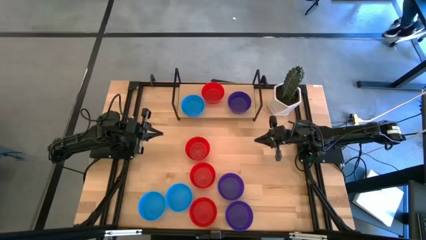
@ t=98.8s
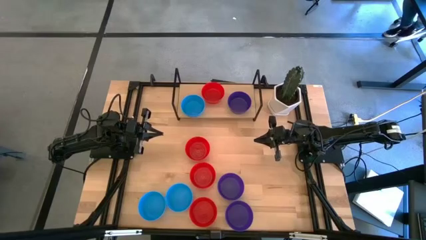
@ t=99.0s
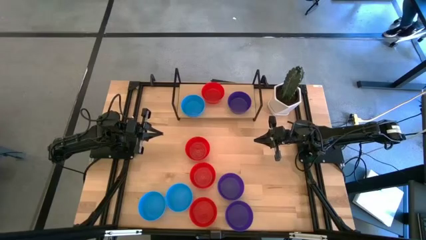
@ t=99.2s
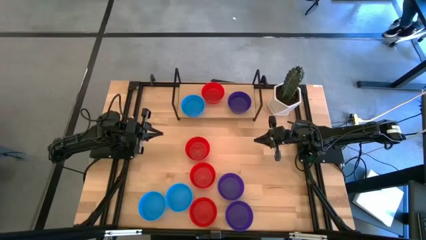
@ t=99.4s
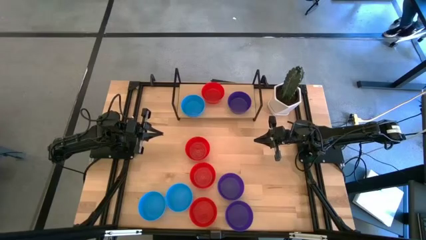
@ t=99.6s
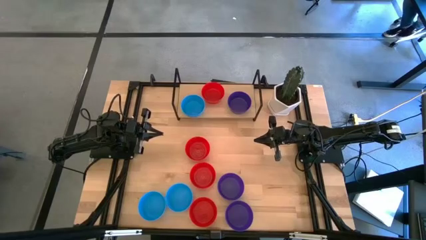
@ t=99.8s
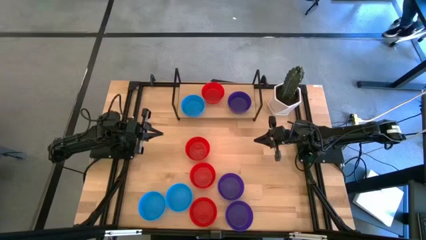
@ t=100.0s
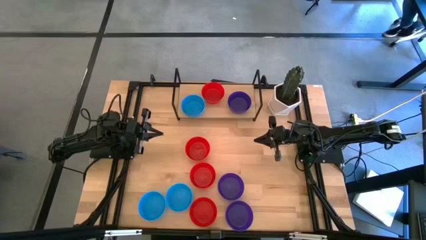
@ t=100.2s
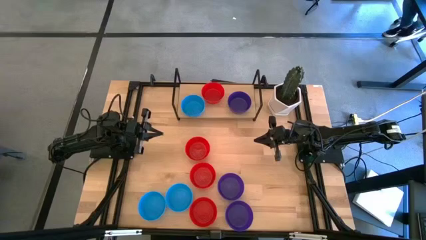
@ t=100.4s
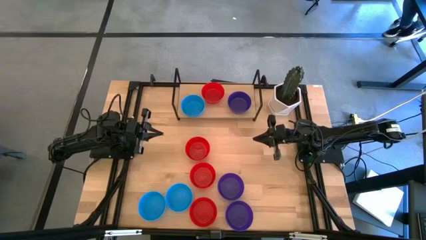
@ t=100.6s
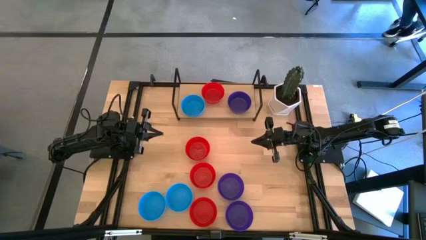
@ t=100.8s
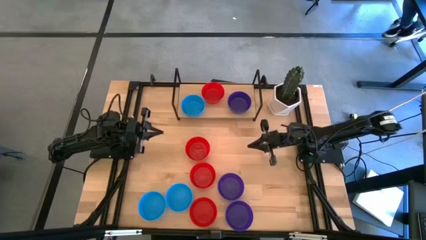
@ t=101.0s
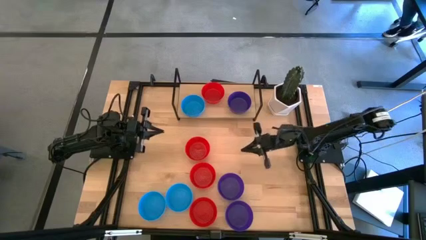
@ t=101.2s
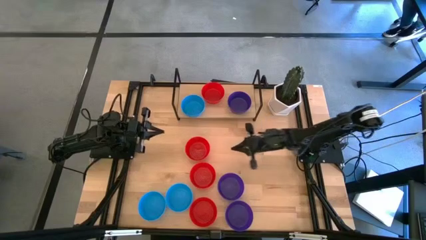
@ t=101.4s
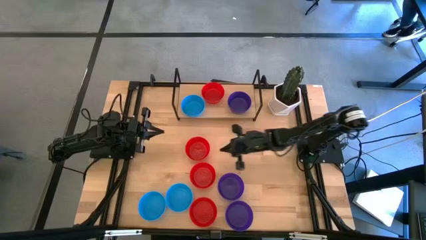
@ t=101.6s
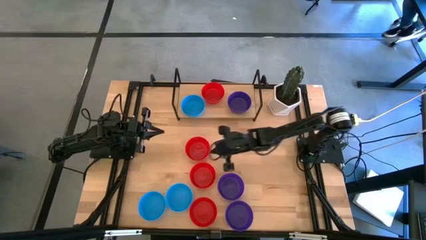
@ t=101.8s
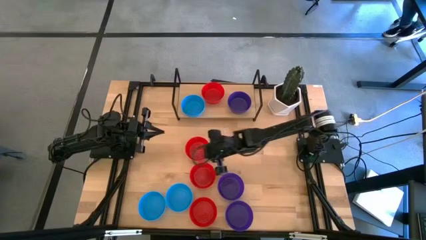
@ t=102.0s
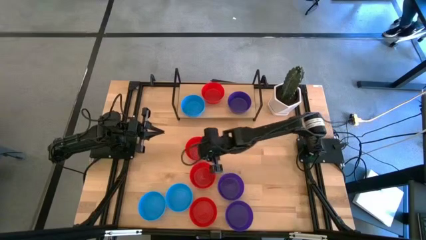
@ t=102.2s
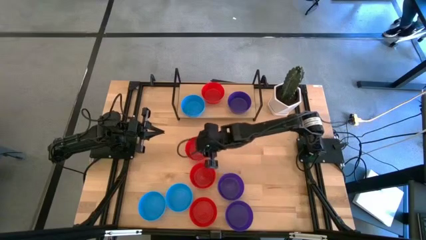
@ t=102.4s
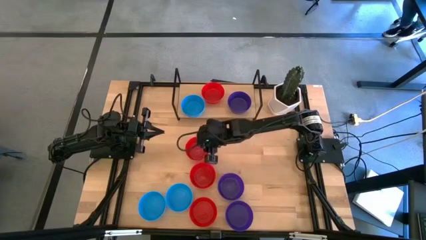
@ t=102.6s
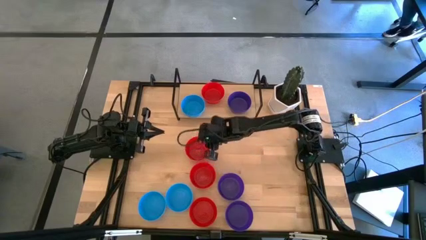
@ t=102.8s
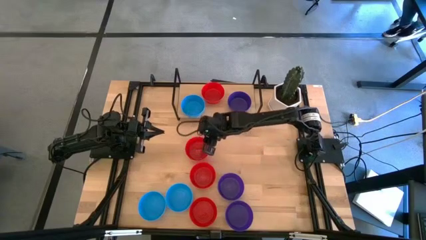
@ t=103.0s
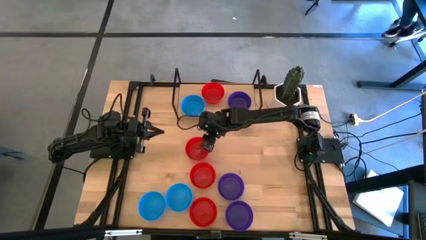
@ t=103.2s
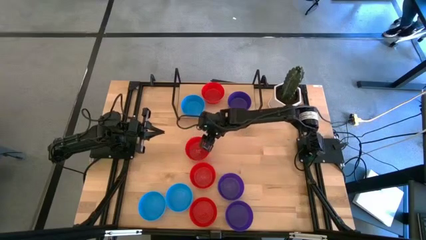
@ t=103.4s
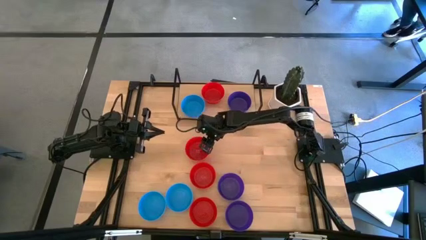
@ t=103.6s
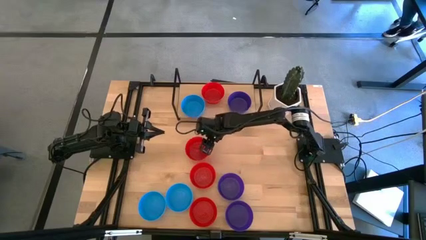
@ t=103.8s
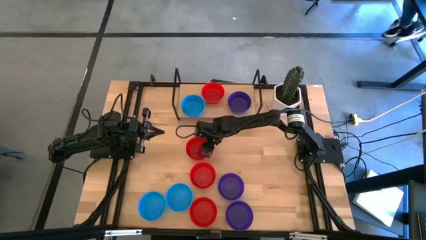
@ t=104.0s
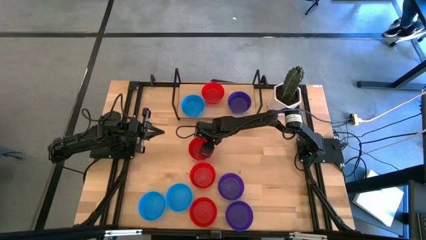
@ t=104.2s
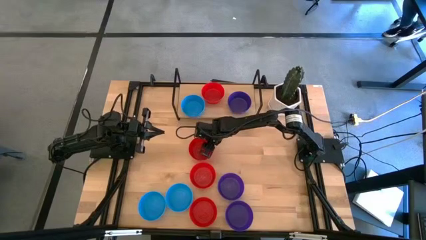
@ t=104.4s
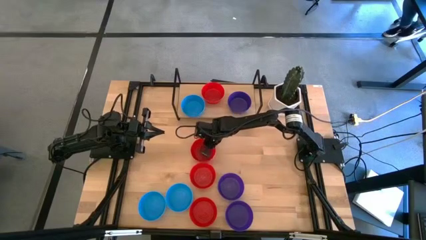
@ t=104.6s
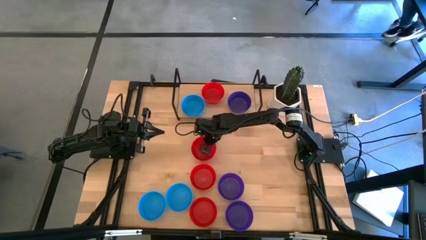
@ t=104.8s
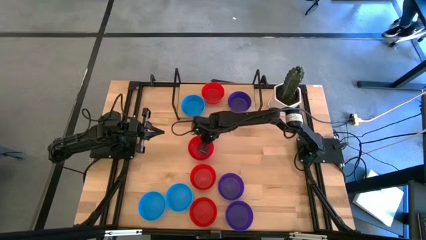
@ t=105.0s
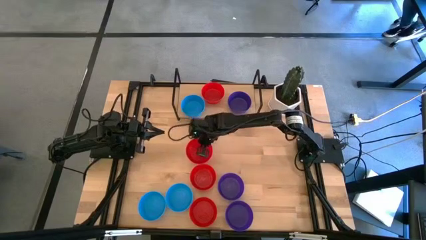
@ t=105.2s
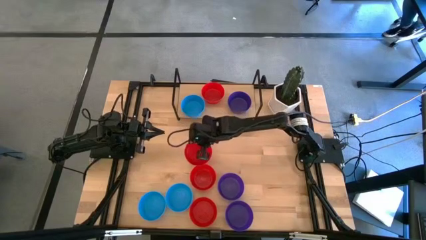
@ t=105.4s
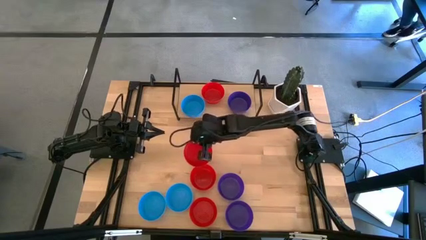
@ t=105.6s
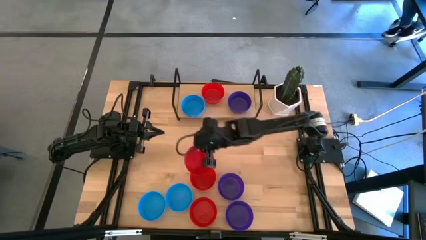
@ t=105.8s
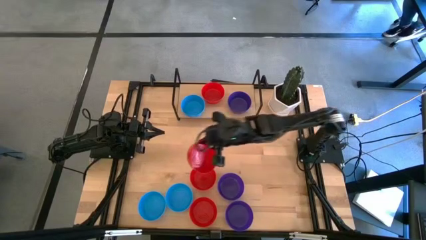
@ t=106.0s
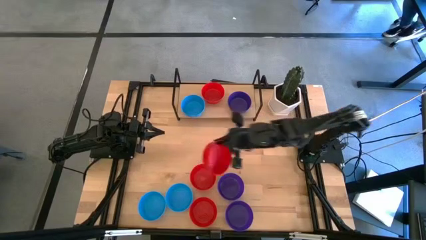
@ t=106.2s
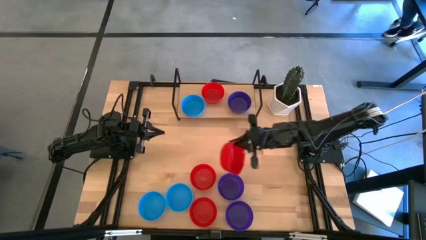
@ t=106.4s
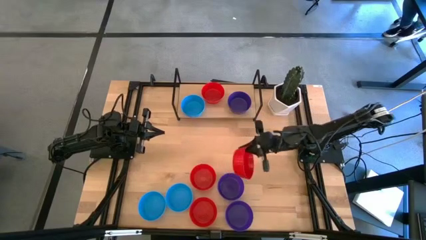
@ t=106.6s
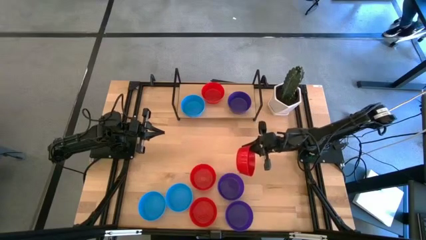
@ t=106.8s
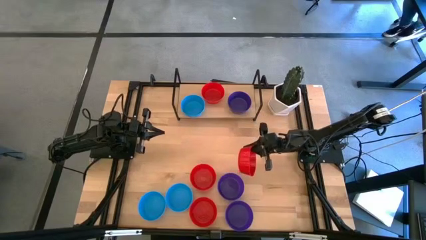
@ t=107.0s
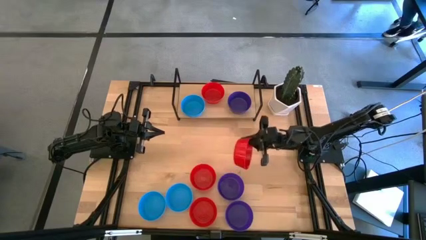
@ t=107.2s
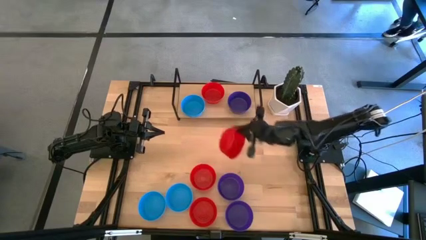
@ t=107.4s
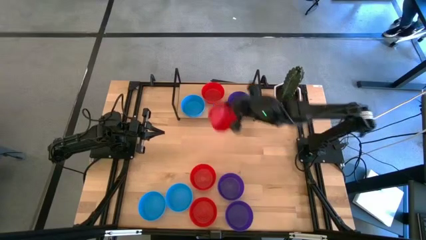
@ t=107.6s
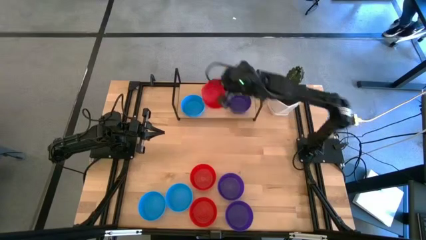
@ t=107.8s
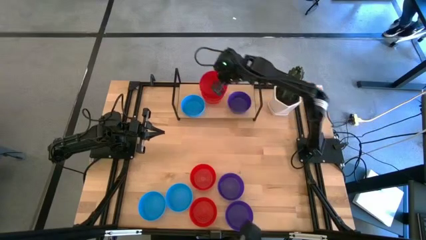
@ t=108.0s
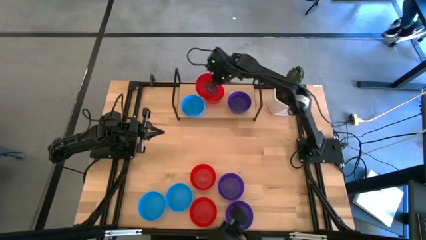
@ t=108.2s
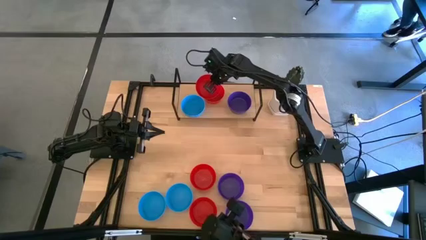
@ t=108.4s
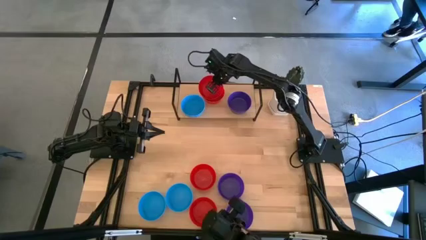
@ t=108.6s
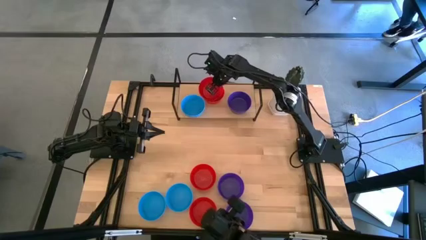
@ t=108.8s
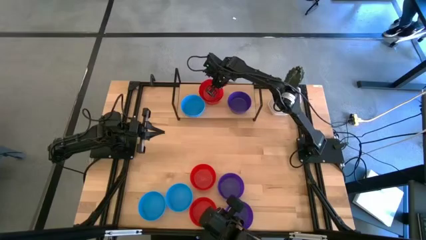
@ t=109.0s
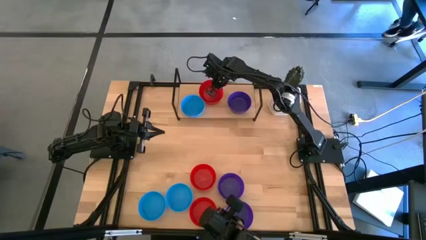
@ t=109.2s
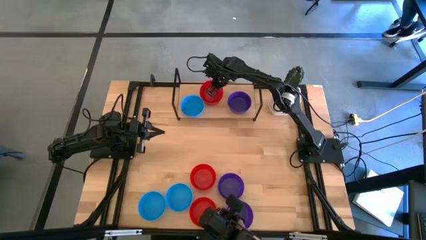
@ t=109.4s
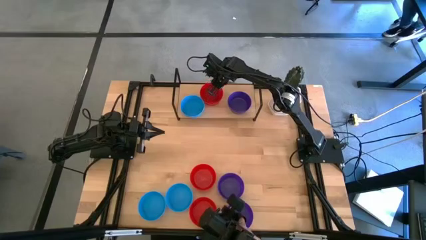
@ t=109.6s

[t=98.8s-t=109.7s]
Task: Pick & Place Mini bowls
Stack the red bowl on top of the red bowl on the shelf

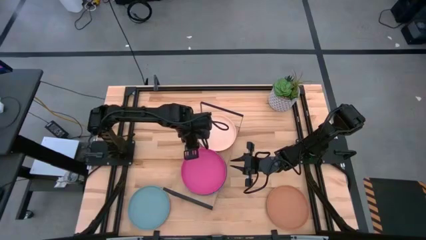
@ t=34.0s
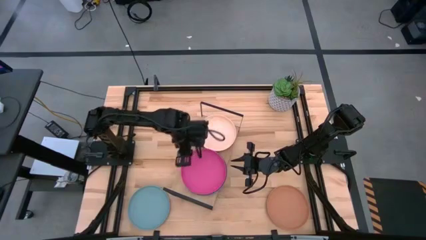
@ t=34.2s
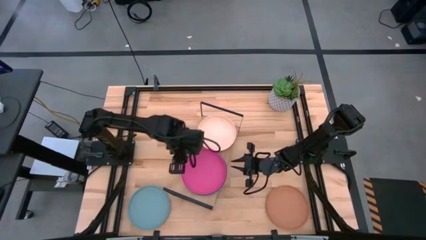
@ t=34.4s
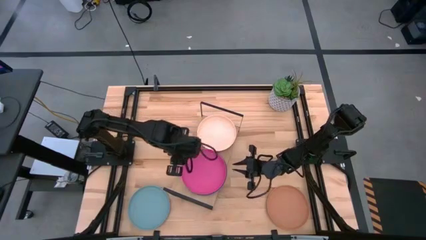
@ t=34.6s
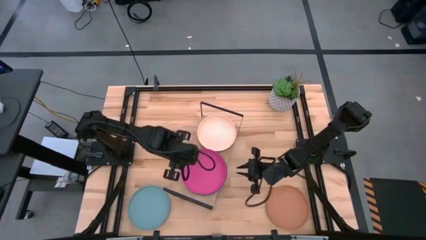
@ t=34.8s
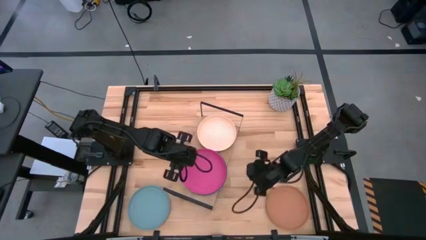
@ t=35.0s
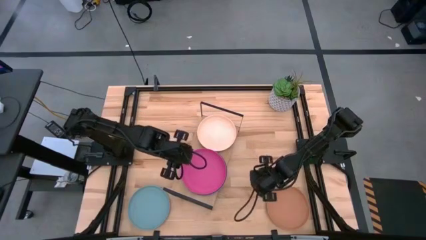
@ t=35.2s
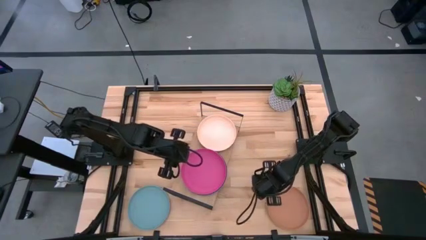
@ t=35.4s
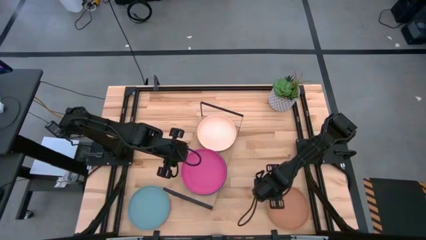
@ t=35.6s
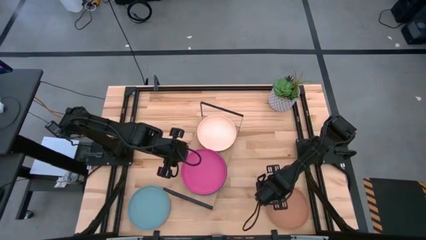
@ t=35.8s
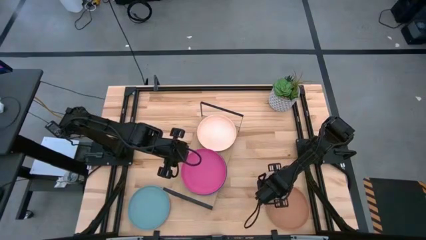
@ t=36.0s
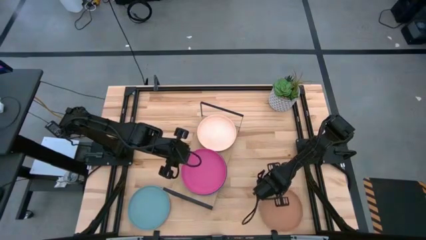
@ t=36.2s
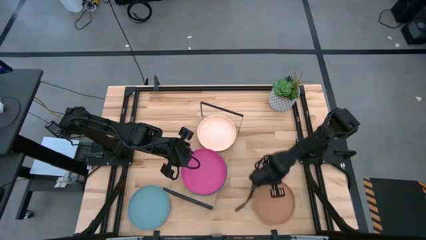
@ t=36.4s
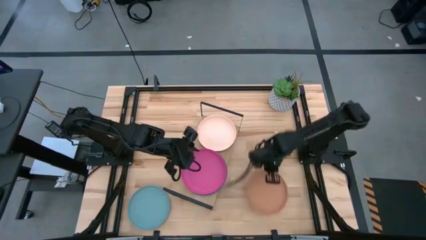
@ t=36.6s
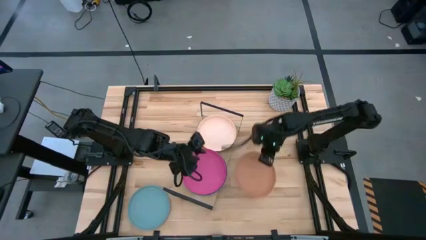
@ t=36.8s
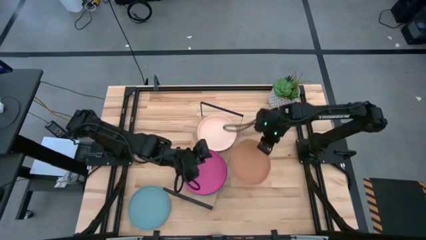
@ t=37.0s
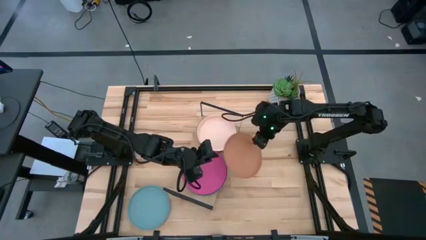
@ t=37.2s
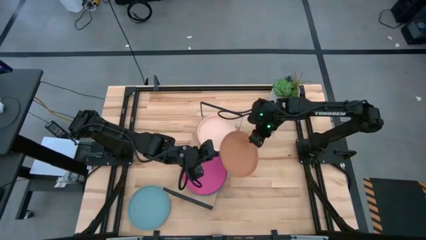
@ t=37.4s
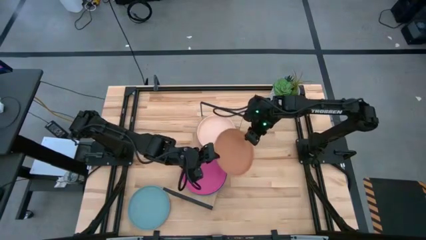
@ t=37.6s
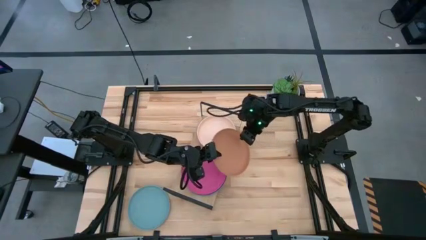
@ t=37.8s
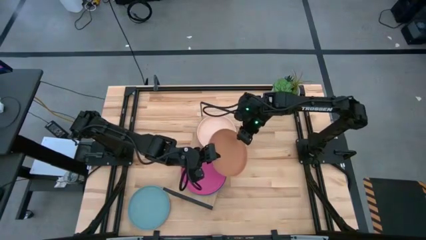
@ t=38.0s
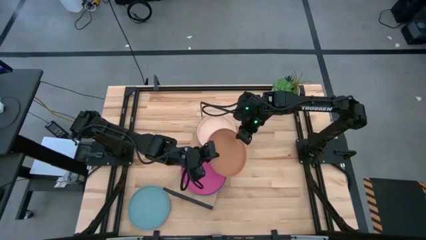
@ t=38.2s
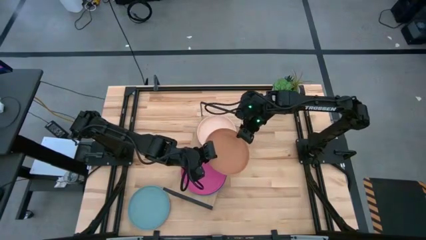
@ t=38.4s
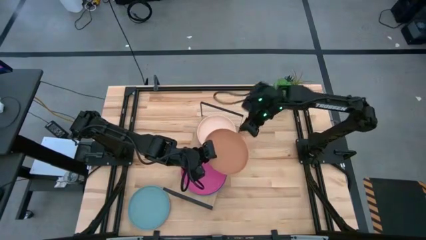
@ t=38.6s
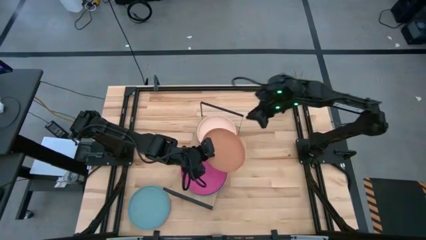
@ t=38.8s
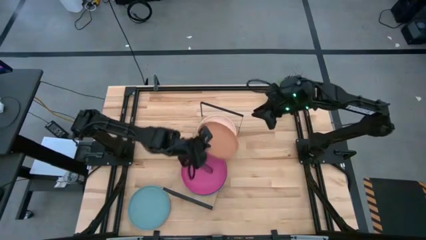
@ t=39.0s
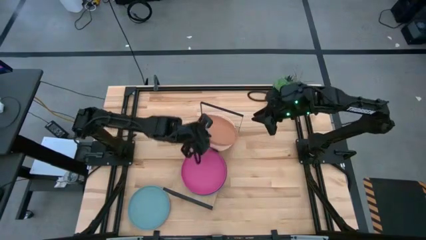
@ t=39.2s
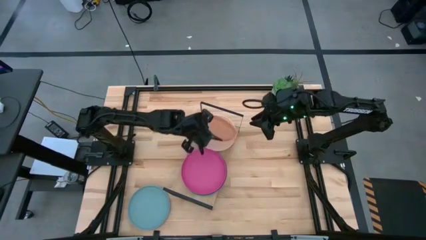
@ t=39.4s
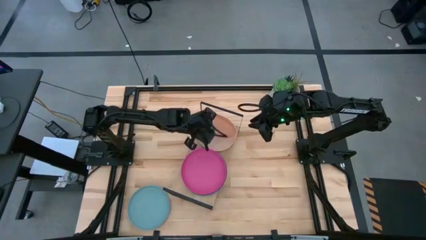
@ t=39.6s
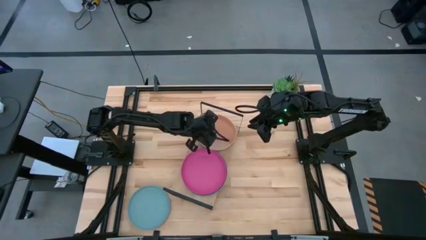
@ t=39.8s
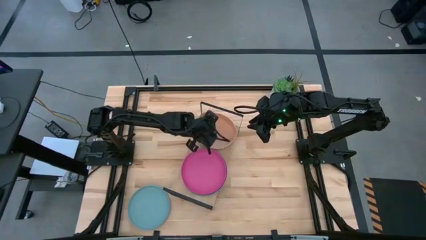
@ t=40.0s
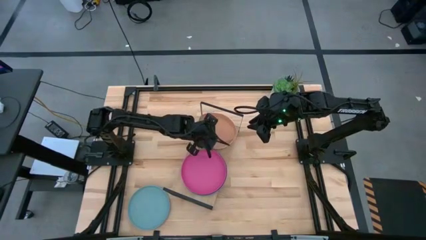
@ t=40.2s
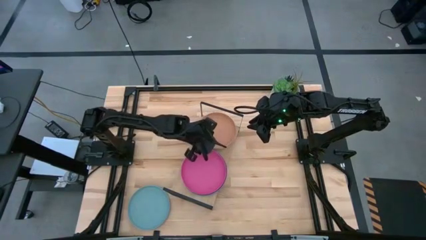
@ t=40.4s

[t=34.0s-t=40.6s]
Task: Place and stack plates onto a shelf
Stack the brown plate on top of the white plate on the shelf
